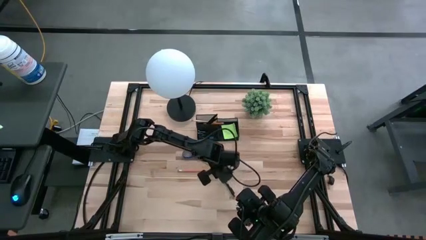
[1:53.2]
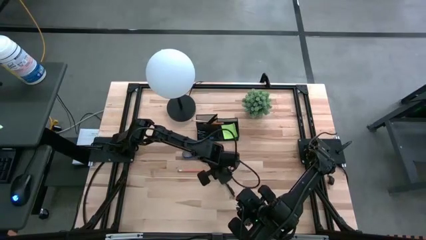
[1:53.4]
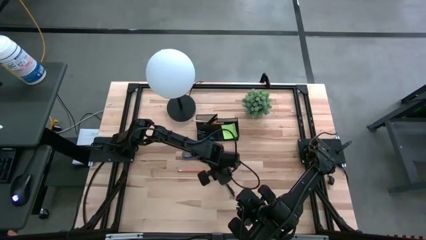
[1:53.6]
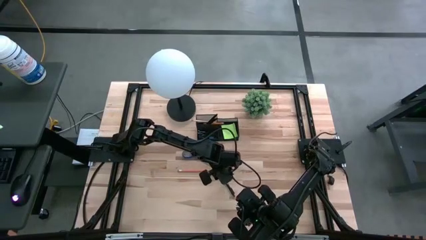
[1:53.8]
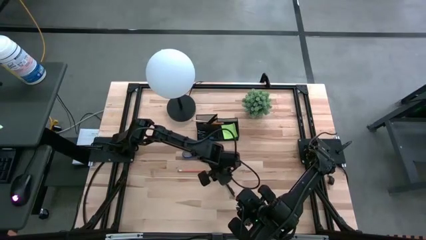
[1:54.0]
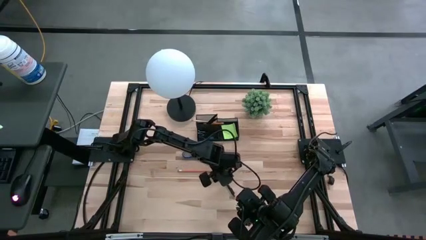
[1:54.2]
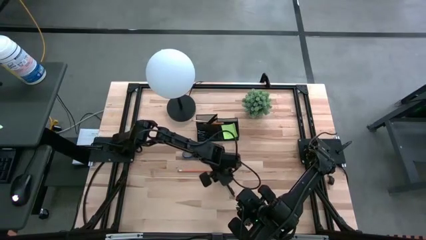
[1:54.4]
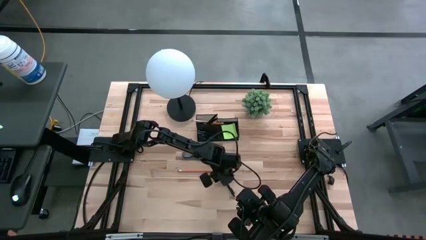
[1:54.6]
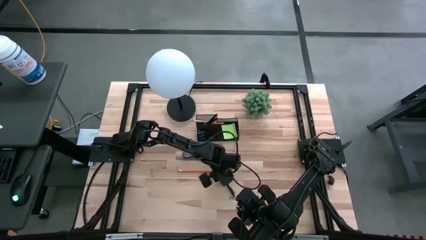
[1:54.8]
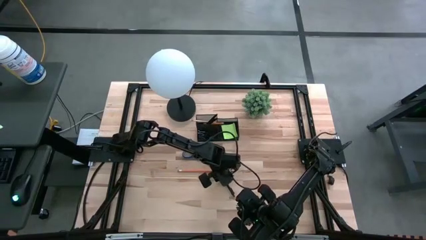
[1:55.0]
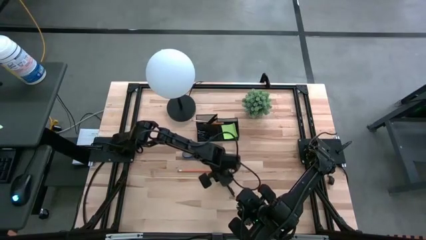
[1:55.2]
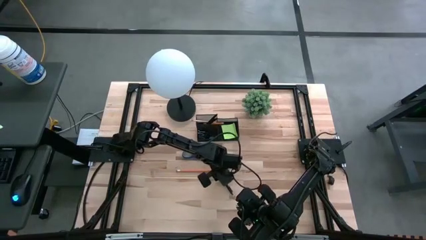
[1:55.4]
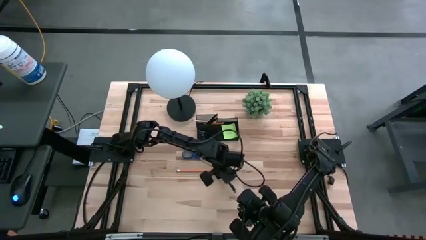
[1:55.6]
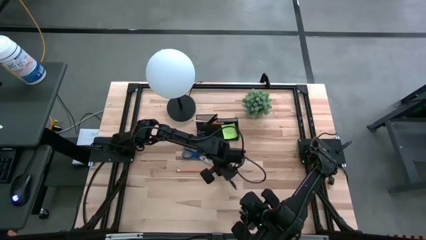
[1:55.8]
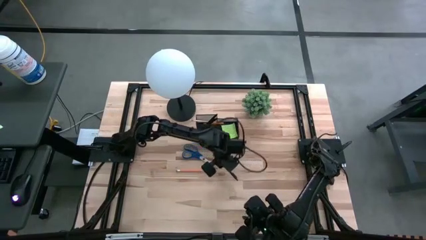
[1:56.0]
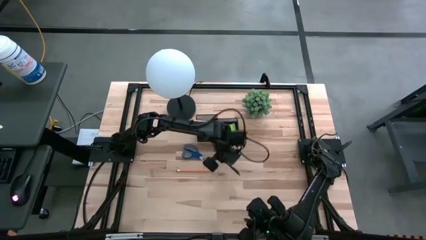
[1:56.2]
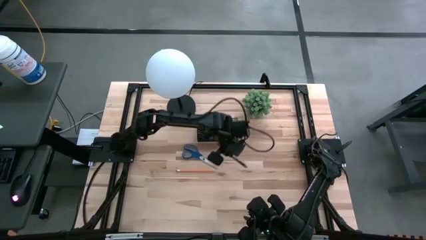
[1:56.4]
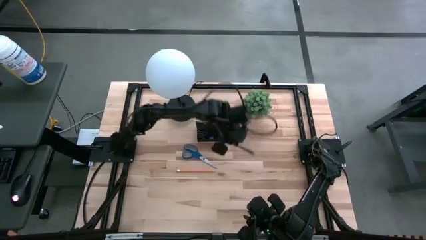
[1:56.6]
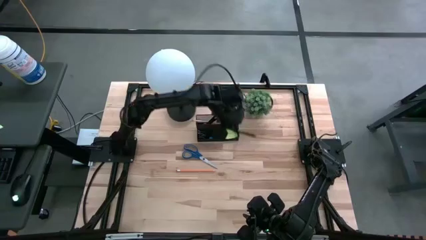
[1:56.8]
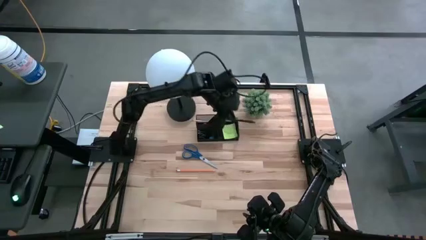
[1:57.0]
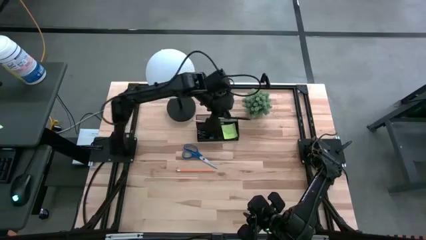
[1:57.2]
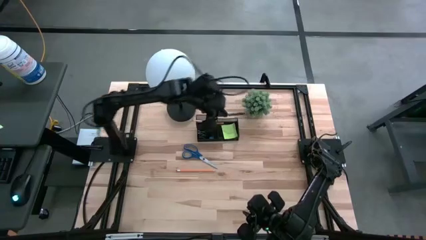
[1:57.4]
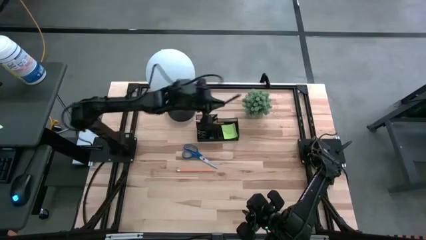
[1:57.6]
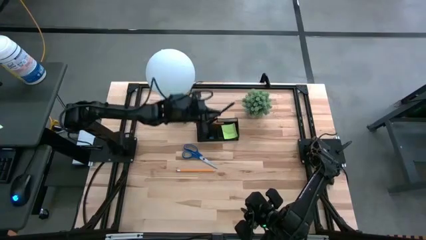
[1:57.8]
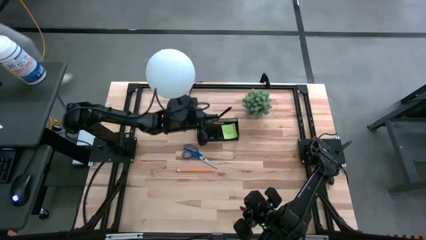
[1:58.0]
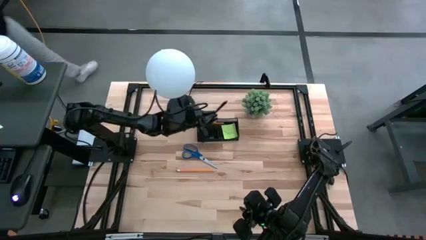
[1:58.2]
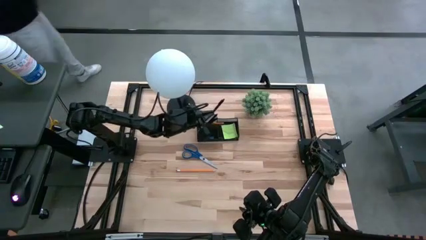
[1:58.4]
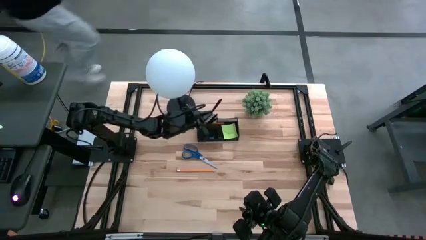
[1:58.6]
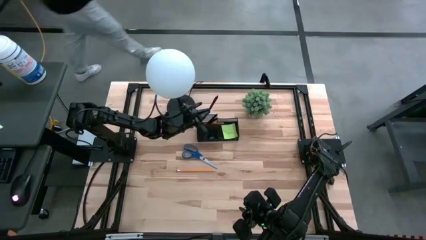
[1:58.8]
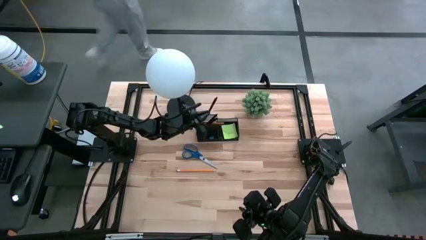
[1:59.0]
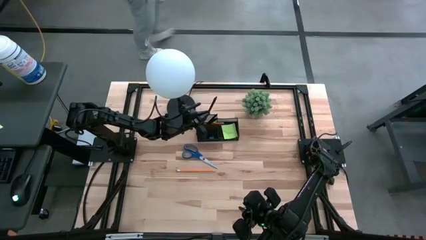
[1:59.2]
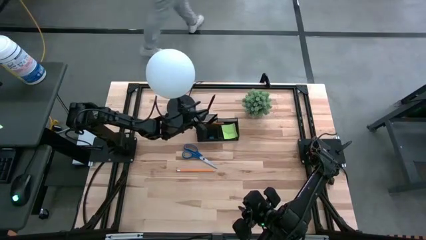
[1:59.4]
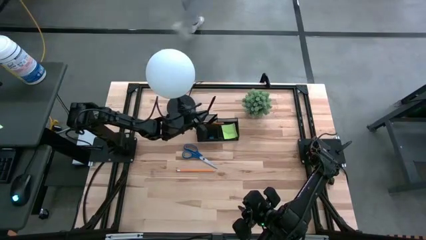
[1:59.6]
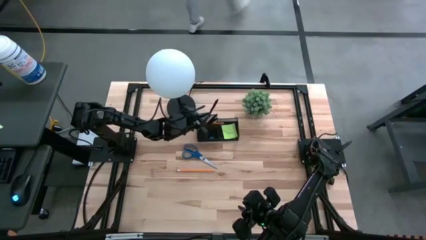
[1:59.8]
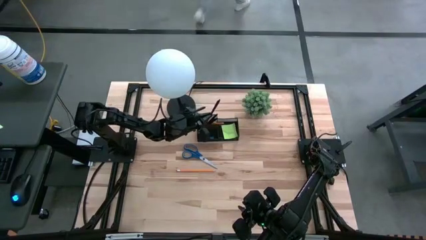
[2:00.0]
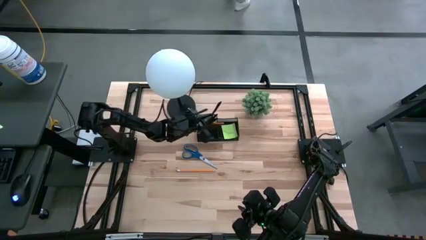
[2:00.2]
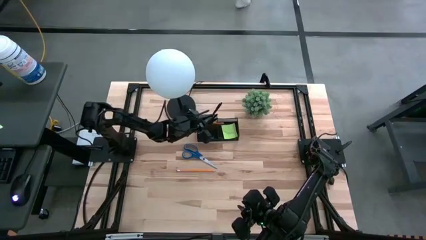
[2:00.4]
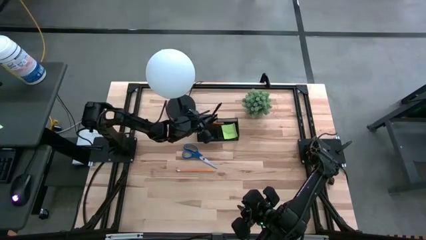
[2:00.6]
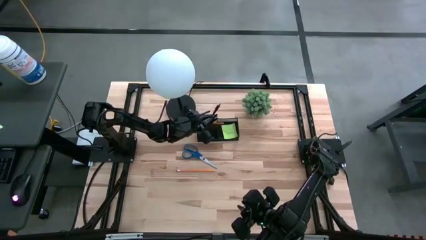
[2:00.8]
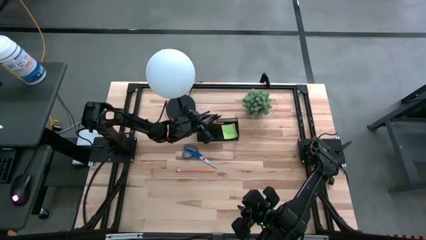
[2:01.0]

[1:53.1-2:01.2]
Task: Pick and place office supplies into organizer
Put the black pen into the desk organizer

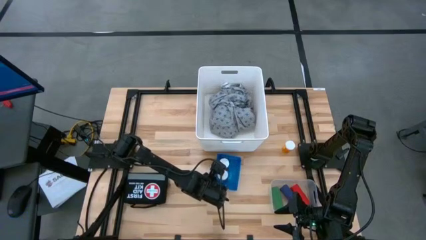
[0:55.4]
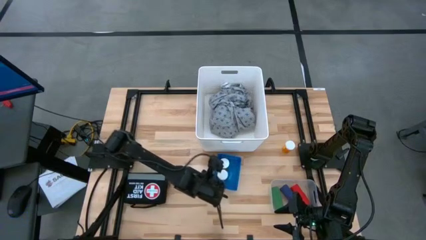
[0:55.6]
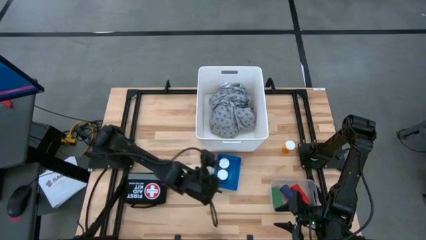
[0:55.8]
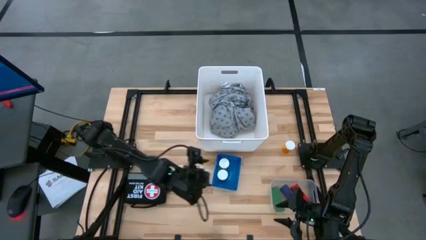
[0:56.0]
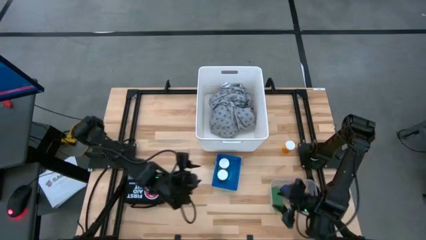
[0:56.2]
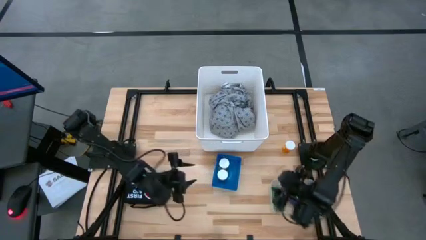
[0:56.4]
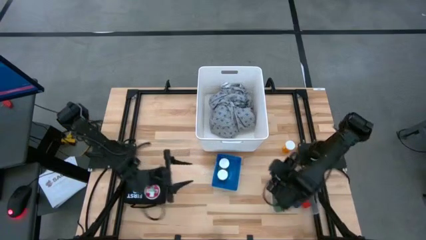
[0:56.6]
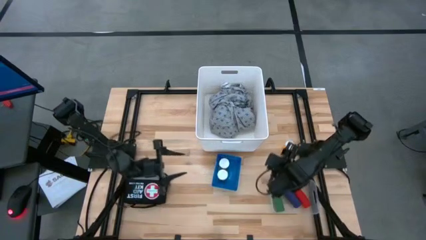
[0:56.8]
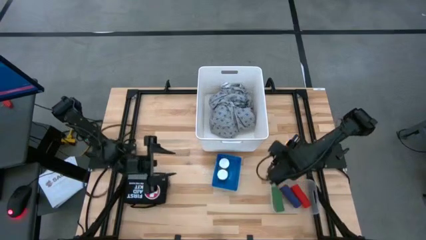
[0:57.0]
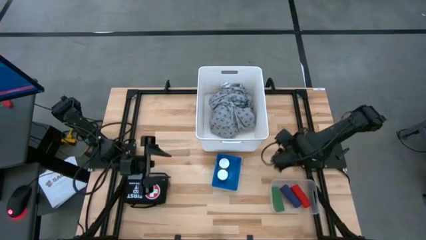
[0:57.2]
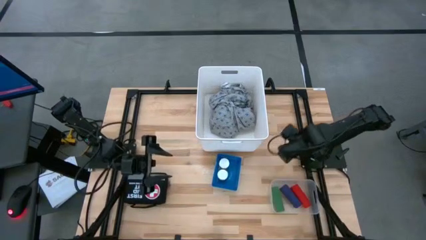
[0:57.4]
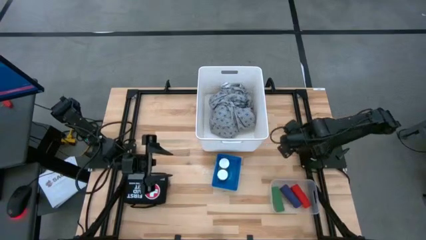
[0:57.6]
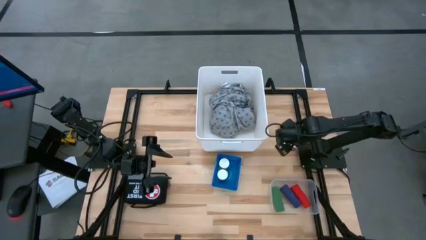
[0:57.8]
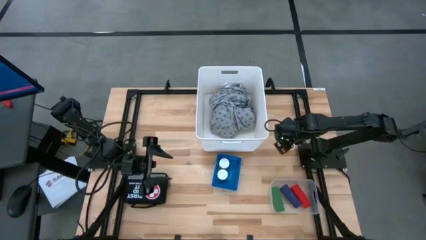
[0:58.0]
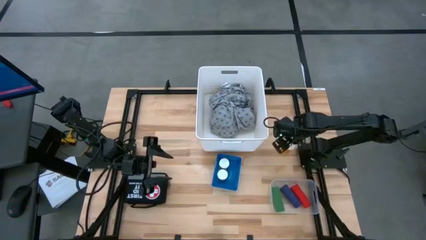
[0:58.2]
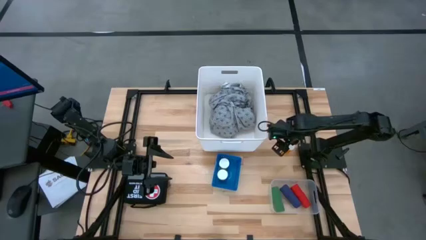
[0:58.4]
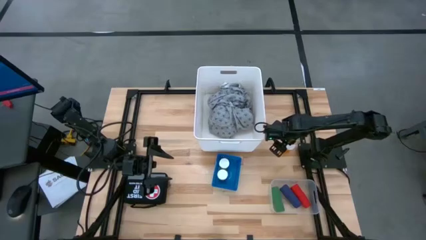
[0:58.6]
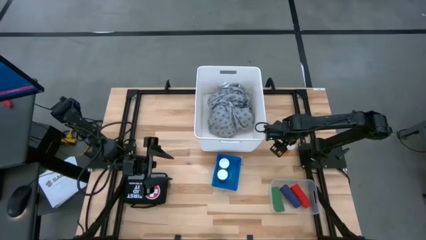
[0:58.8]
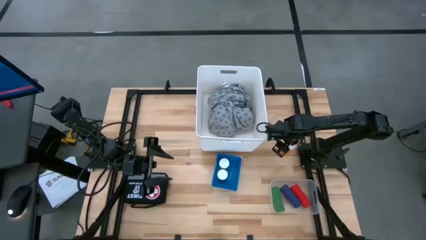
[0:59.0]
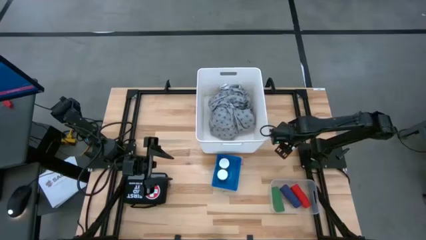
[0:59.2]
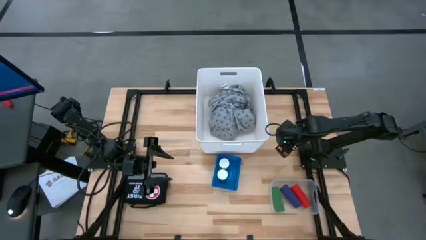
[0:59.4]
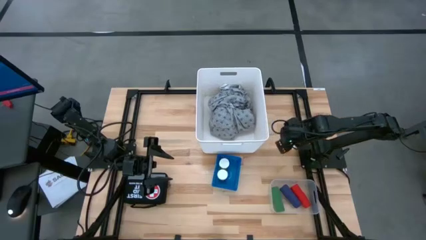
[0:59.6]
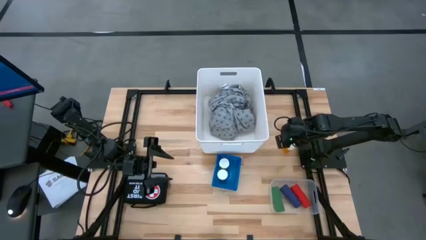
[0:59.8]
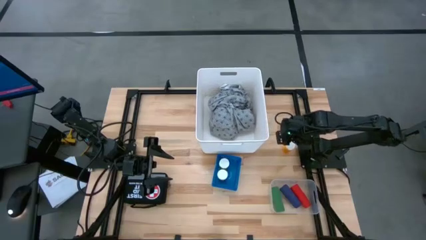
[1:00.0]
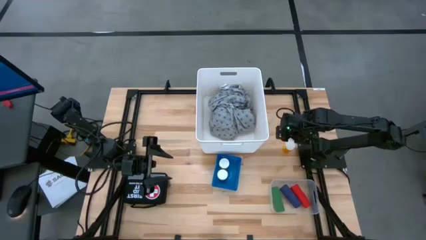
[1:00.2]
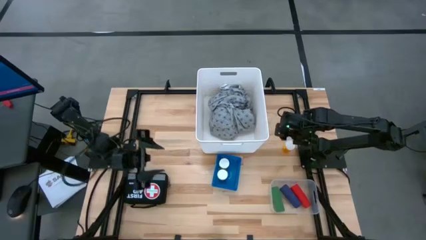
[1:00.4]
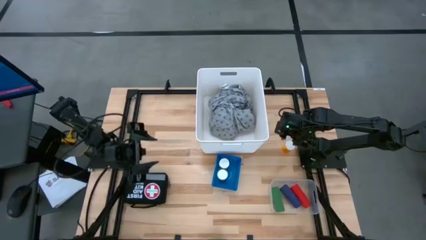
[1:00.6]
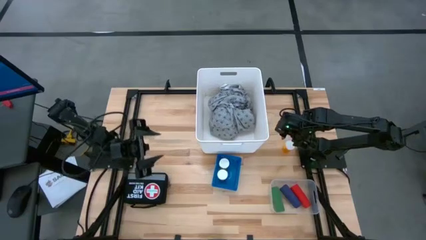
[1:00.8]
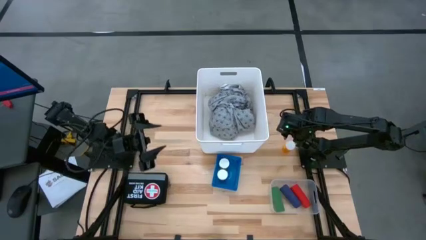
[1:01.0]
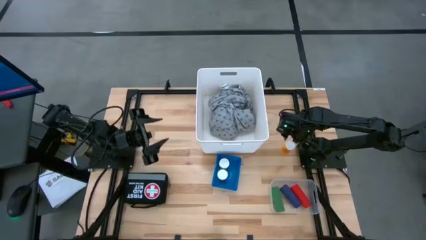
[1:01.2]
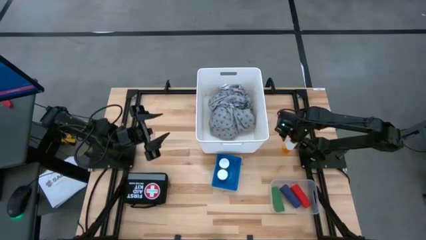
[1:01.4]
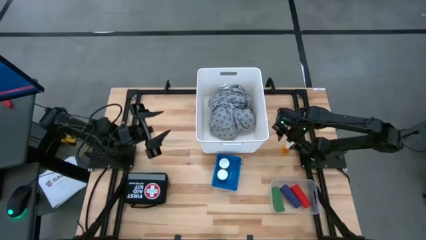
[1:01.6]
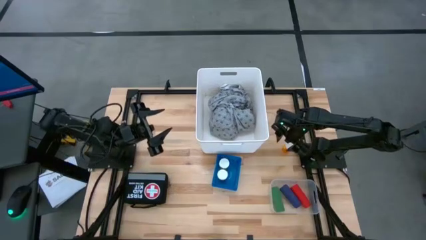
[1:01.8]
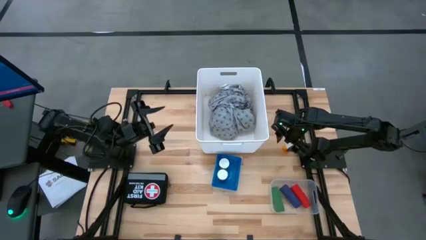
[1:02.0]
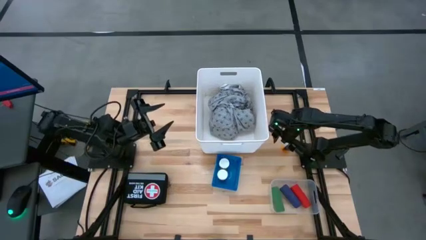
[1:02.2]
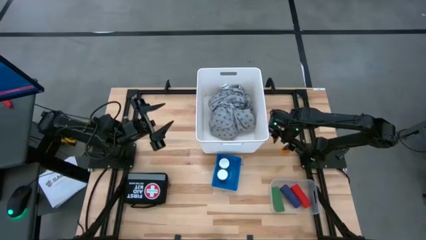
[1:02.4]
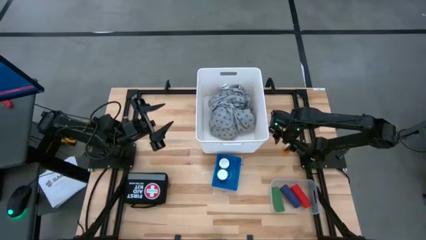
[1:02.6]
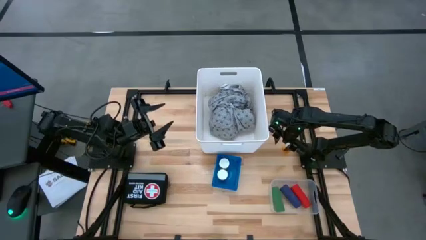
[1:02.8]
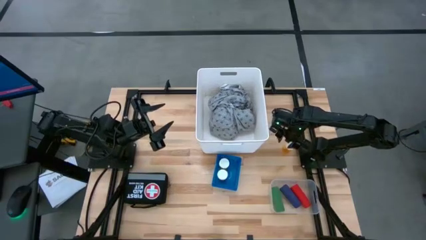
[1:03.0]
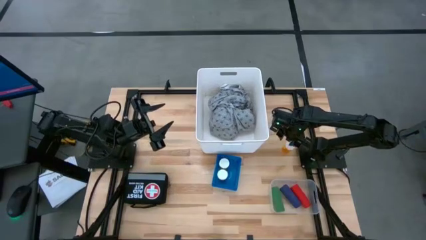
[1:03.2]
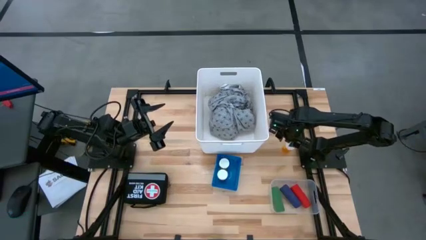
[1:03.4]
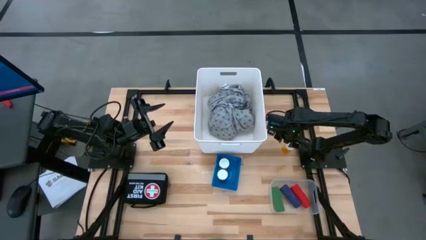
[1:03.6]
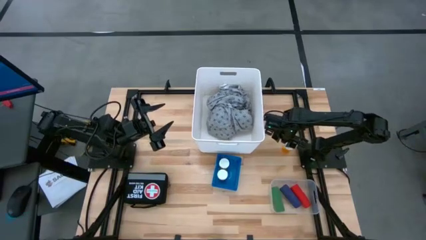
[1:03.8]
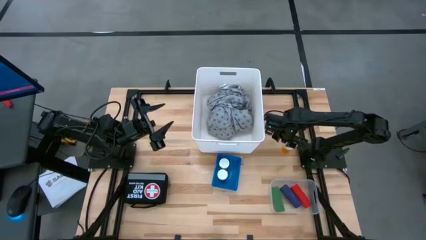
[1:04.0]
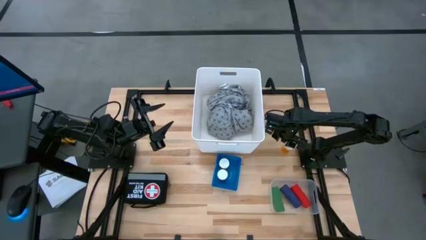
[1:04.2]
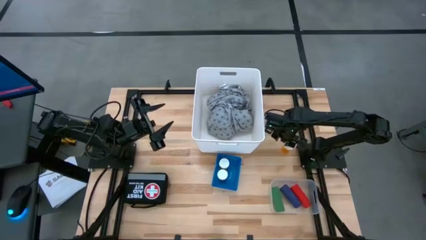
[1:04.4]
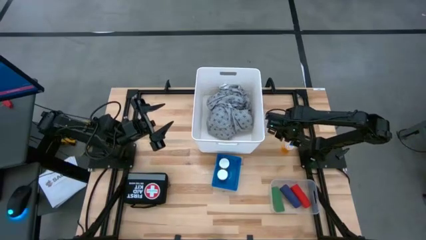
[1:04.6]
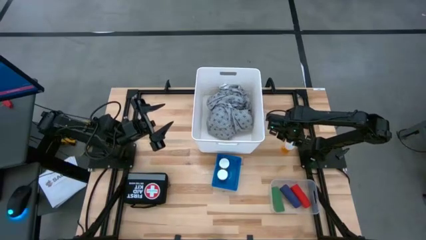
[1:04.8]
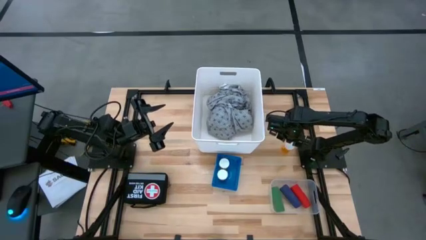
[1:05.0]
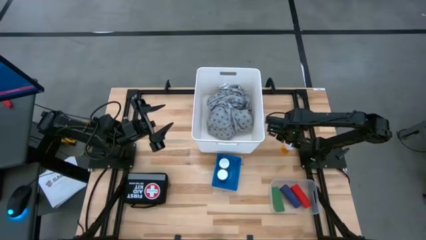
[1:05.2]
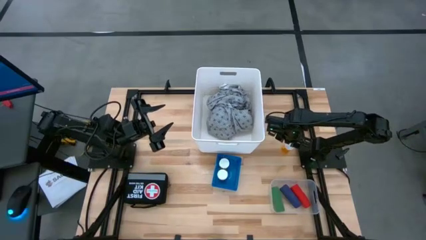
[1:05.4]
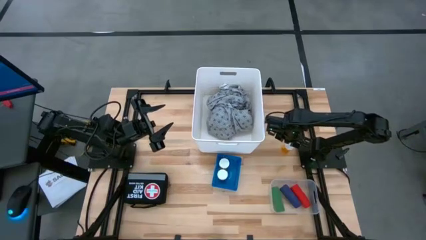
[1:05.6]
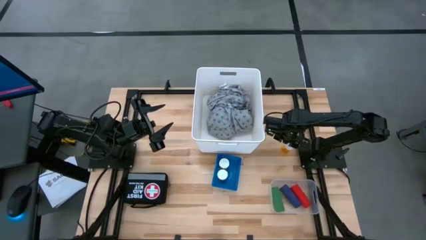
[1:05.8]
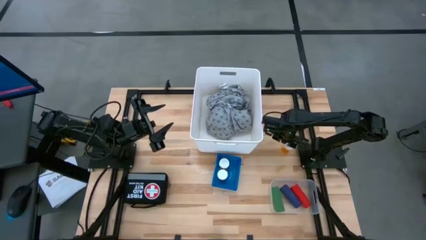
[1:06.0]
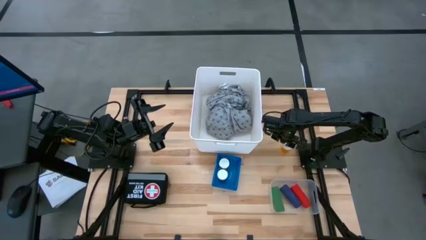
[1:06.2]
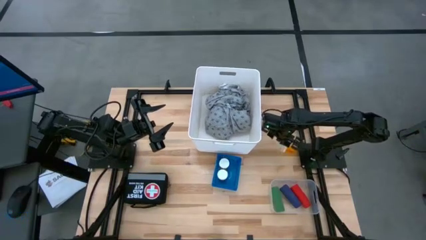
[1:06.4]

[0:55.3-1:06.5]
Task: Pick & place medical supplies in basket/bin
Put the yellow pill bottle into the blue bin
